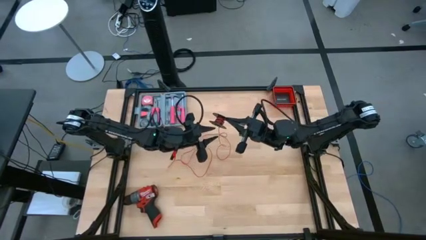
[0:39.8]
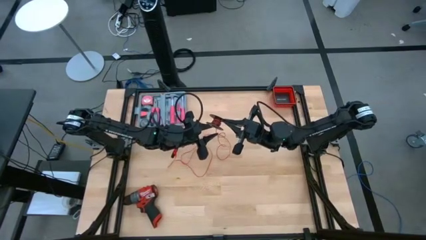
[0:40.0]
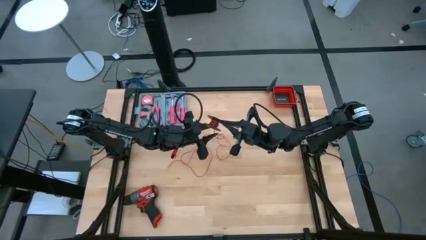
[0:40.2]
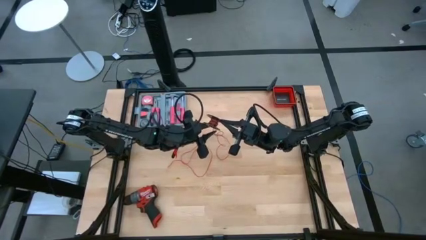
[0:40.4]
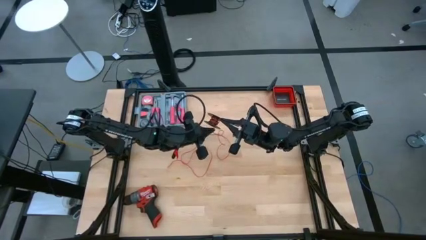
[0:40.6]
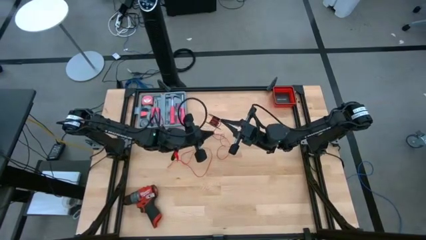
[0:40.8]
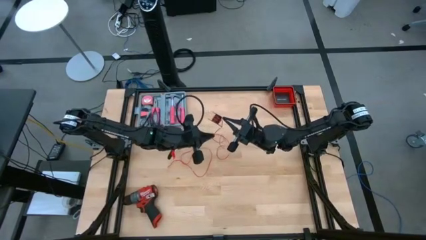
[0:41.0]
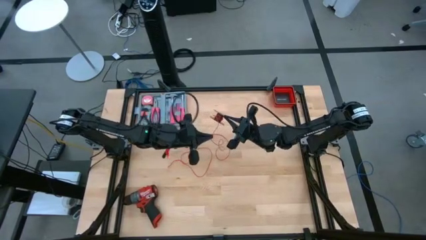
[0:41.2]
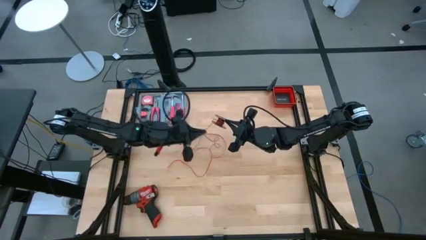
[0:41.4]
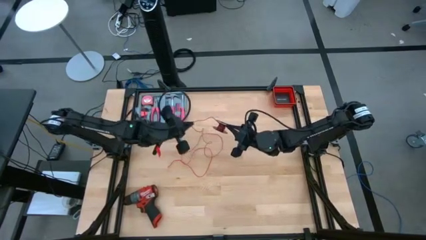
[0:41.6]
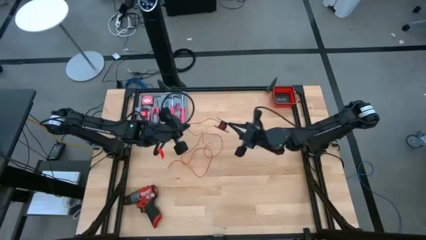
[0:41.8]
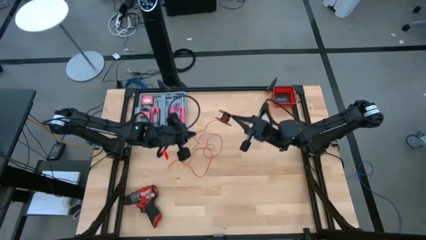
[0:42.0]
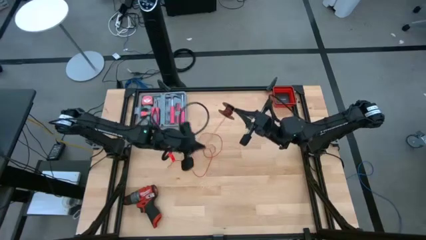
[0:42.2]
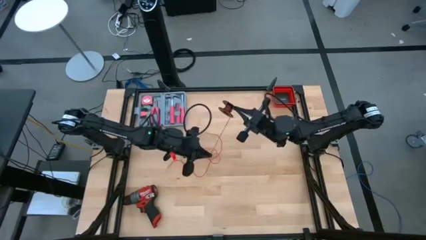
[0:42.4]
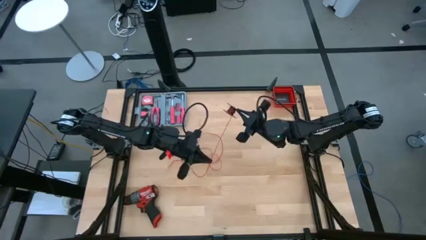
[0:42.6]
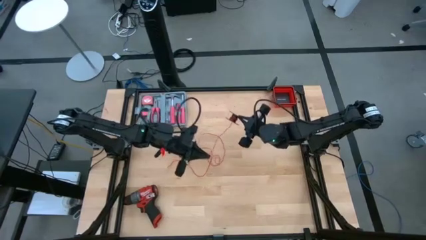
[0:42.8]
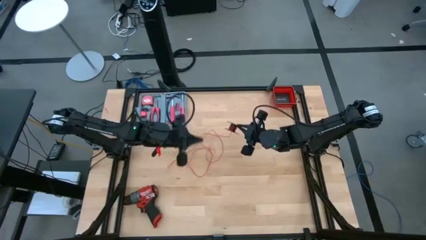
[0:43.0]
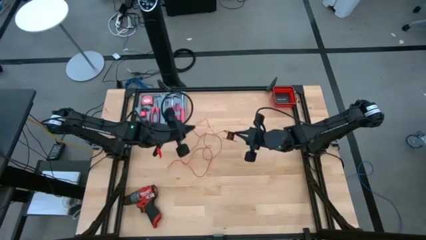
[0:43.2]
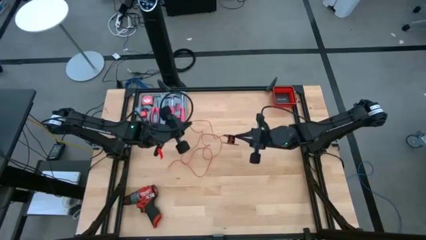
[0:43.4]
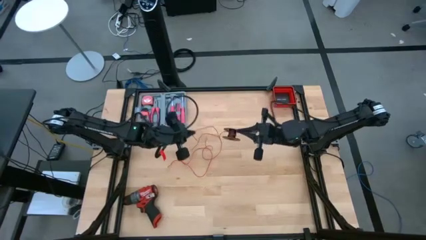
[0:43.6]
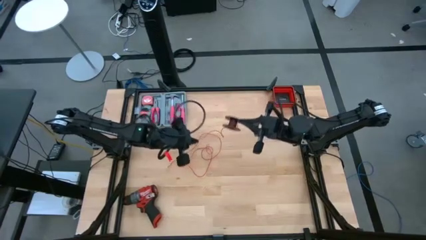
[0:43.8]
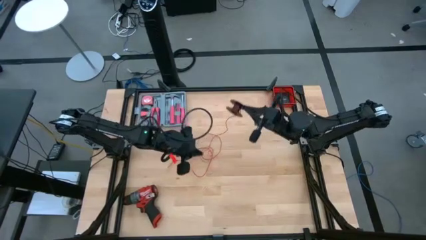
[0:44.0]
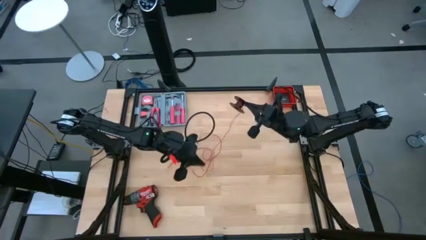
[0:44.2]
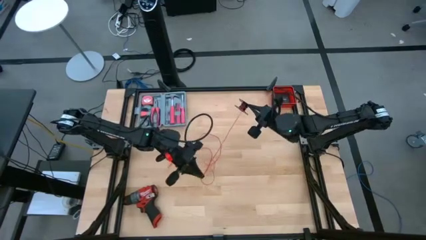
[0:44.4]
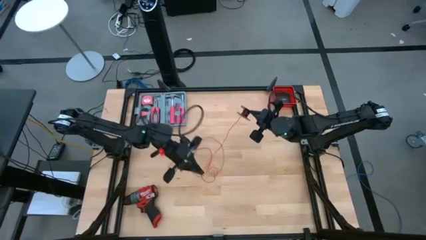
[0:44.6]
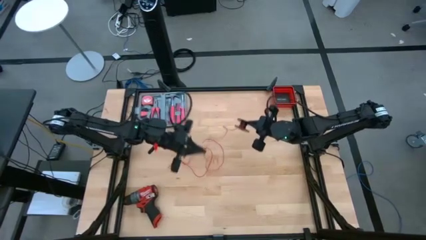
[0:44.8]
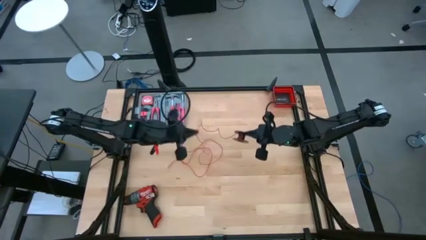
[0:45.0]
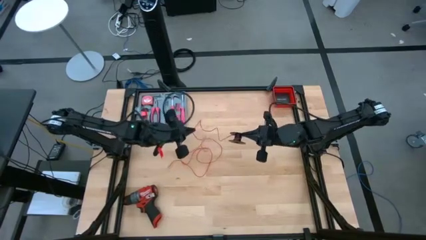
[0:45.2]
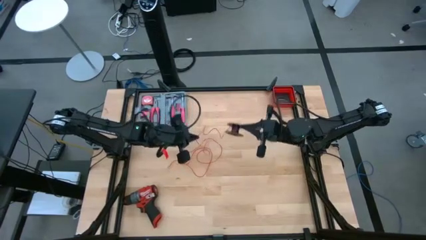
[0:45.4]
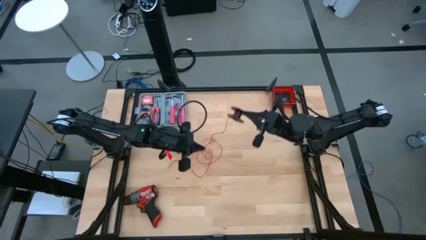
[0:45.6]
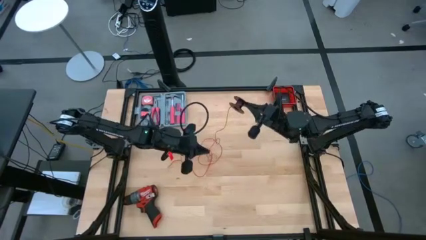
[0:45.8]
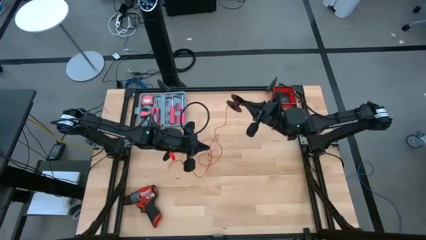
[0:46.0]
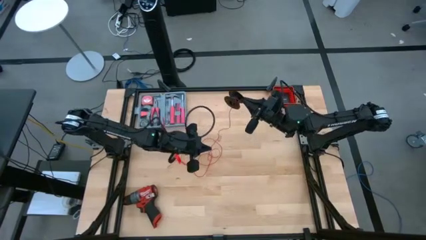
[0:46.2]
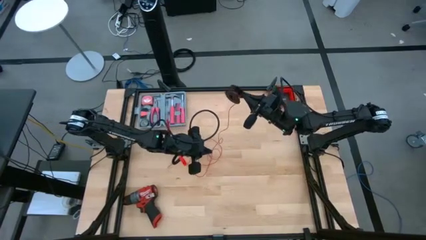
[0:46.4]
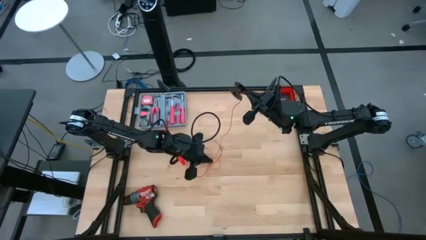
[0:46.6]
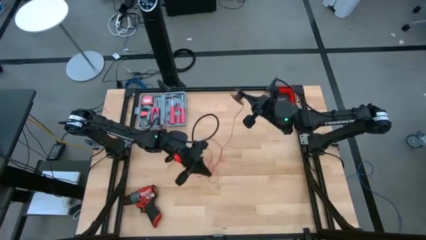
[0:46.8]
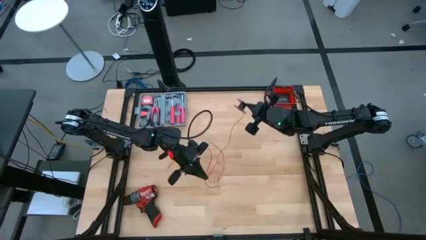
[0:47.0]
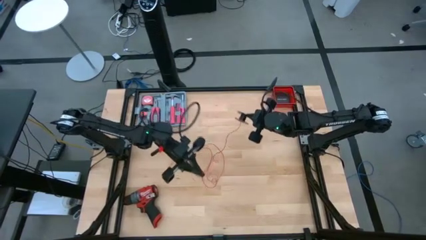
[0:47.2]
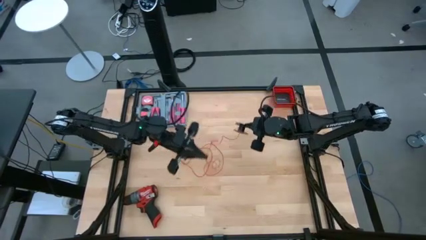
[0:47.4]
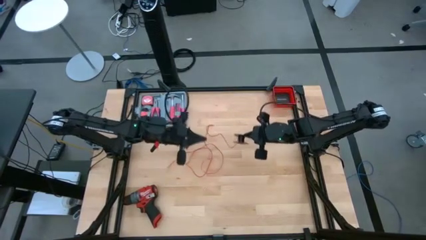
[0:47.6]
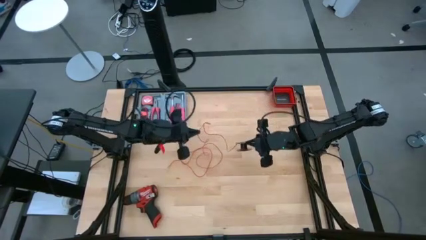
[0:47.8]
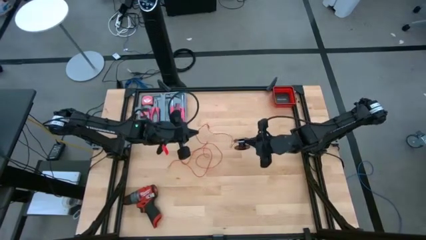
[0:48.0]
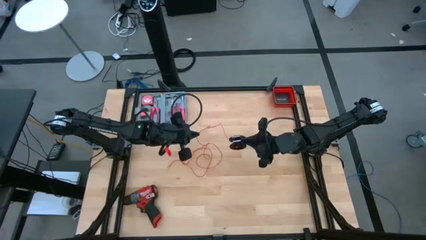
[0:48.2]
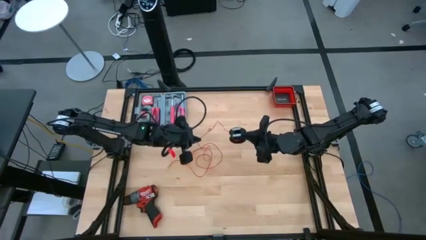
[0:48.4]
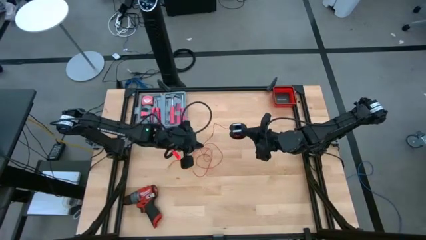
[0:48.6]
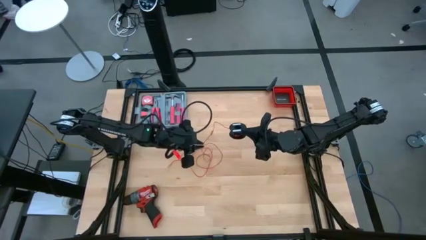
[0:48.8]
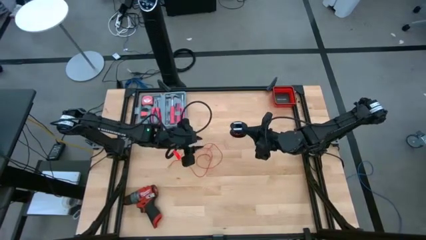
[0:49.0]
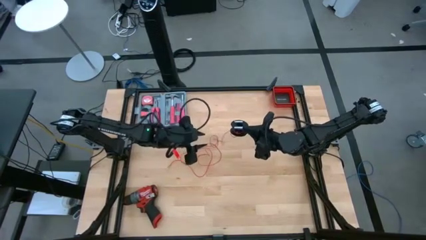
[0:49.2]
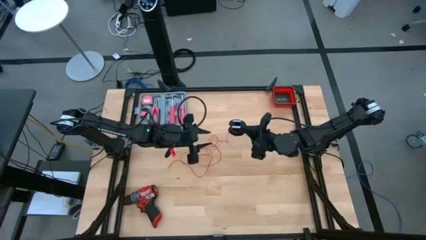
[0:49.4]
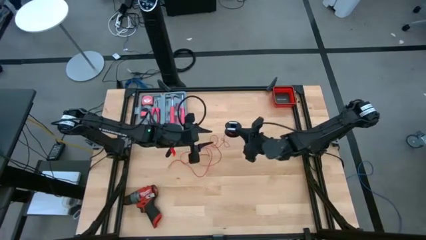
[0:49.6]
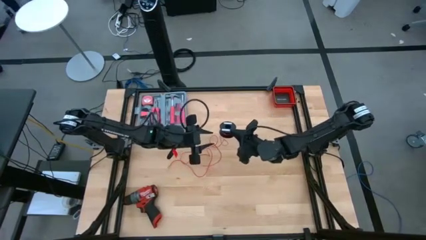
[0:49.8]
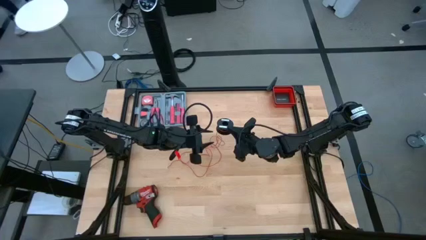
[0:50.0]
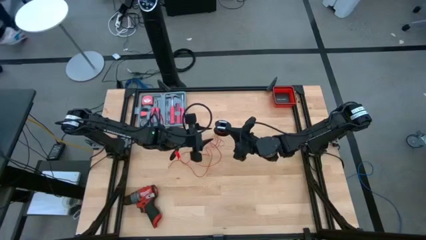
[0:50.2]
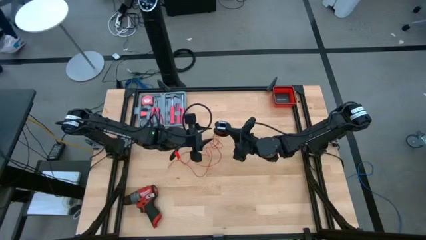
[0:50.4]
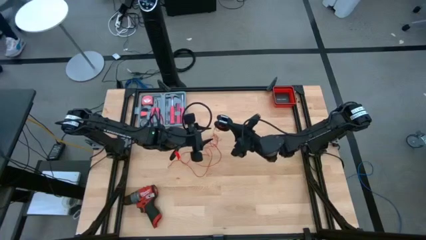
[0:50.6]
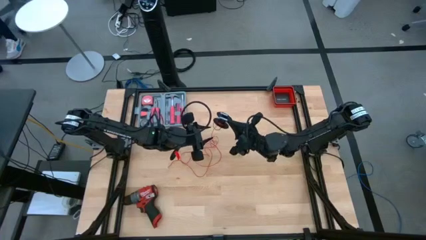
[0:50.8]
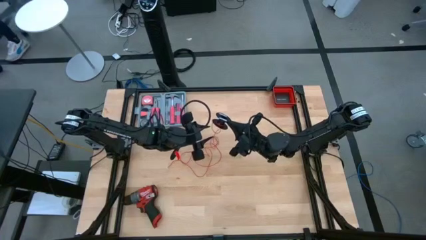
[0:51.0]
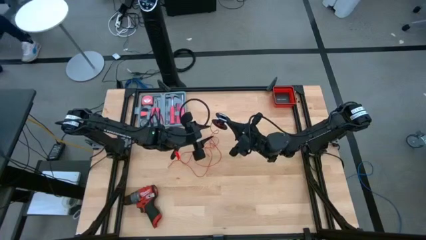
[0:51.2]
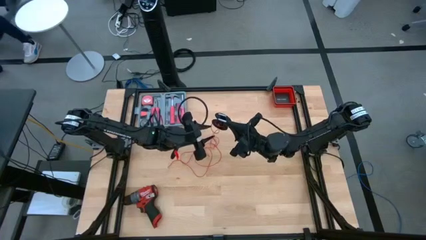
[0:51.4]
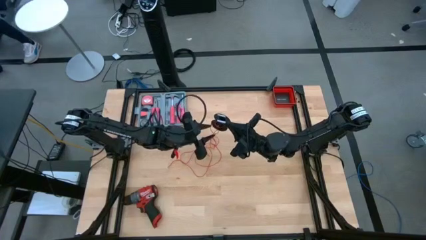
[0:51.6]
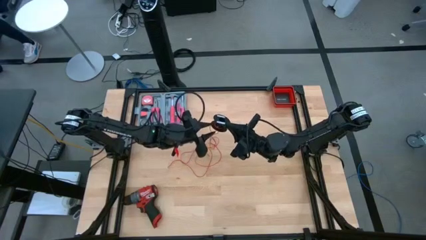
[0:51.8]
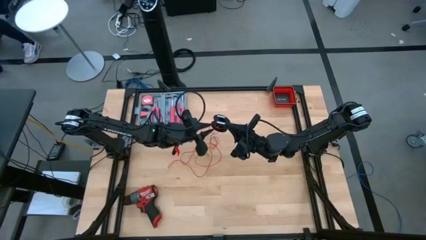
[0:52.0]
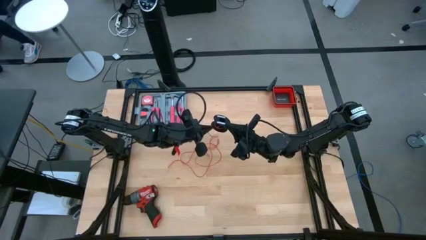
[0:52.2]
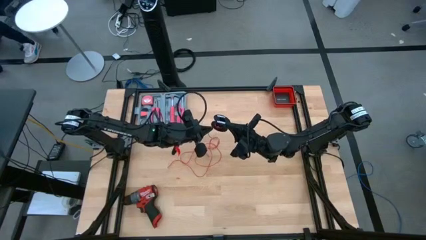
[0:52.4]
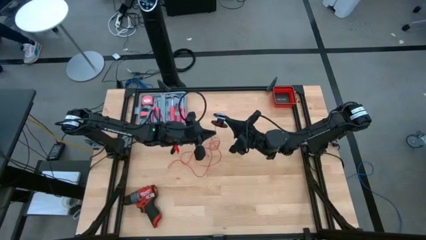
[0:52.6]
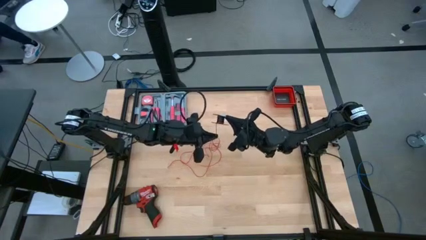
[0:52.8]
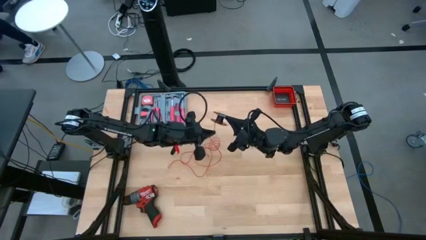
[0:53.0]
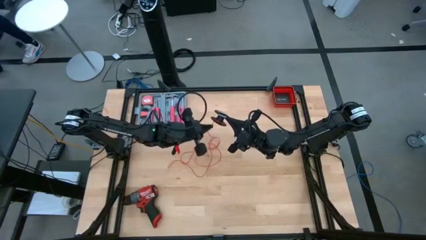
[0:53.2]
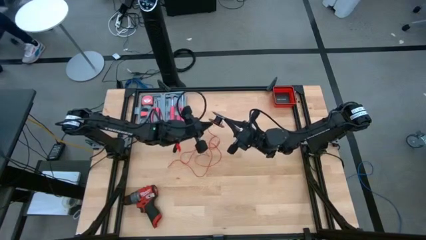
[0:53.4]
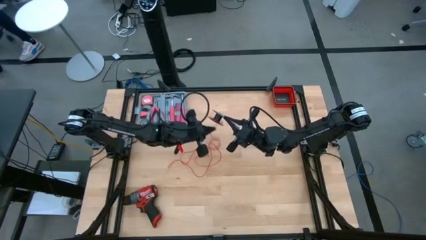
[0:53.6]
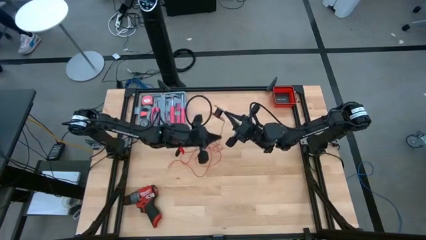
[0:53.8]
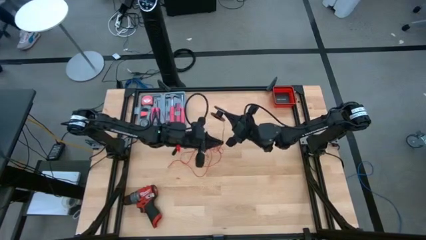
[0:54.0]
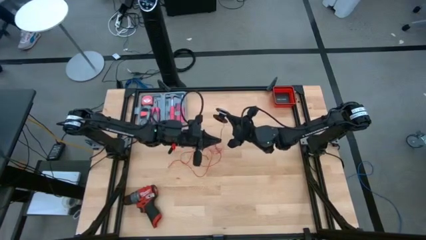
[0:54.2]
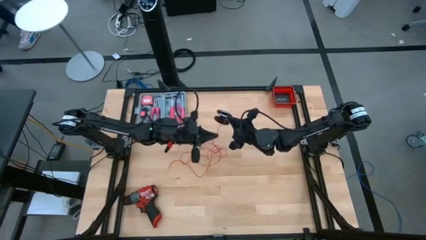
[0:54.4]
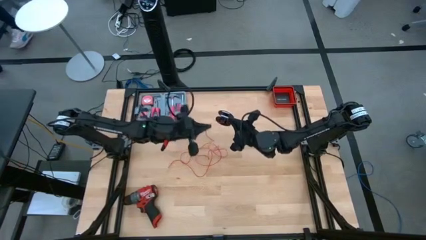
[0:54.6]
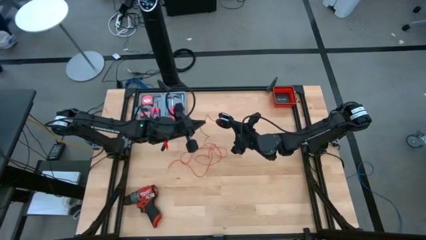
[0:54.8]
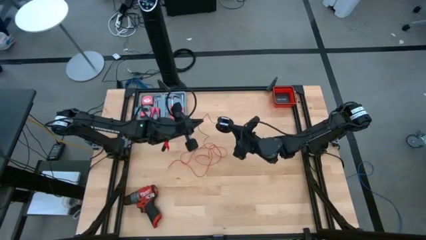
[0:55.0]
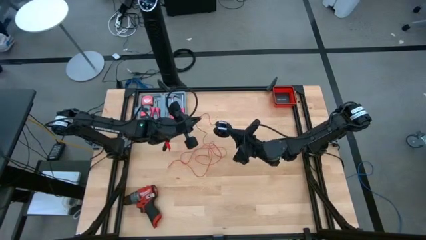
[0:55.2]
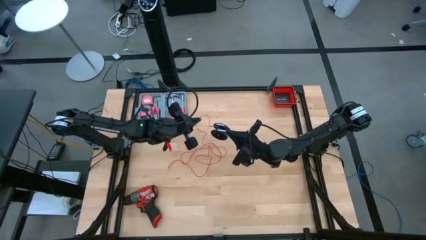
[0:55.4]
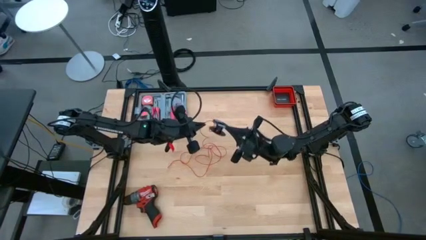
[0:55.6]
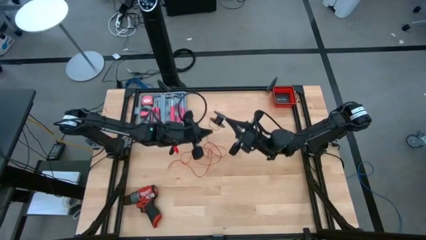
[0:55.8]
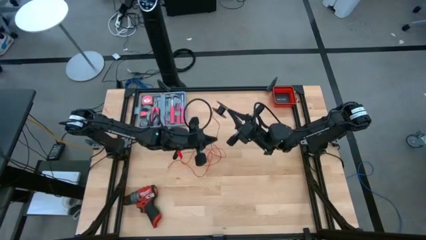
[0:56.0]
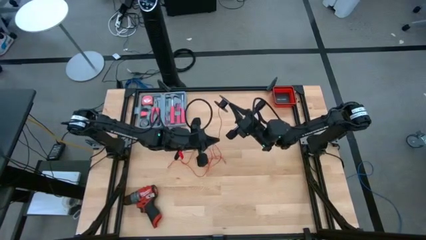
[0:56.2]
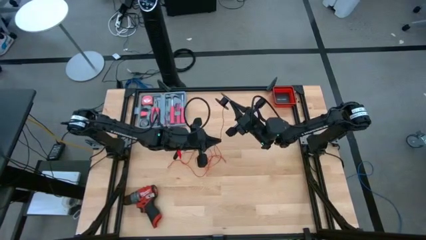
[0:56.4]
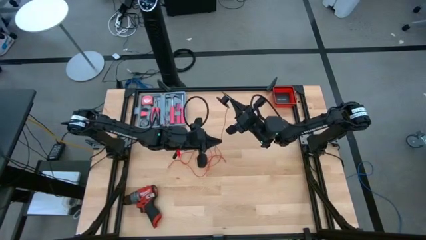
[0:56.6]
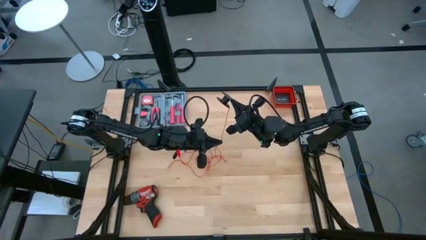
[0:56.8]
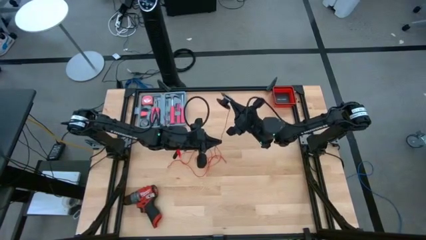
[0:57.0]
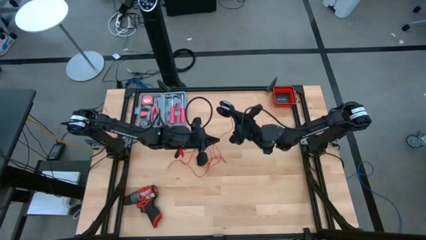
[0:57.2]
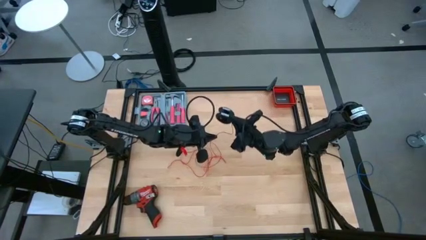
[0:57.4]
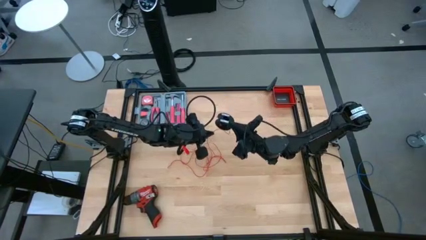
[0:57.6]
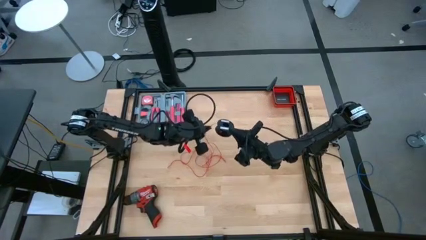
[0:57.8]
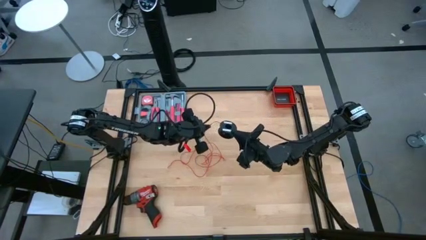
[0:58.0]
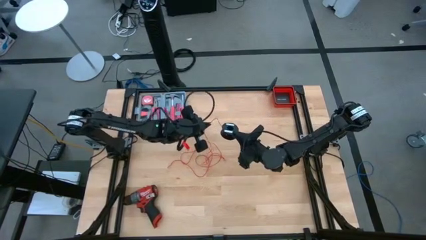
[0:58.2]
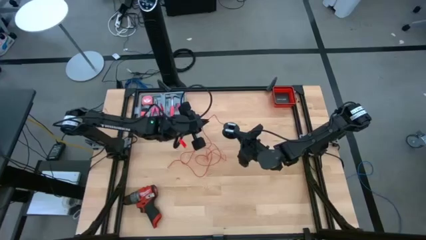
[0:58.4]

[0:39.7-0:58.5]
Task: Coil cords
Uncoil the red wire
